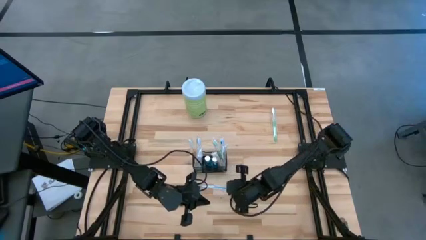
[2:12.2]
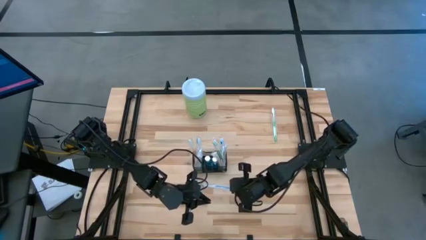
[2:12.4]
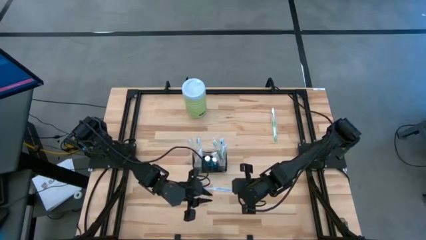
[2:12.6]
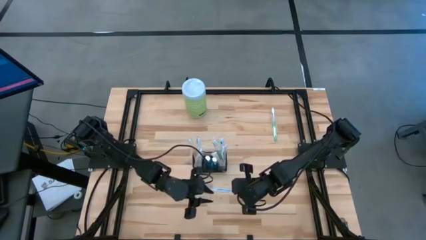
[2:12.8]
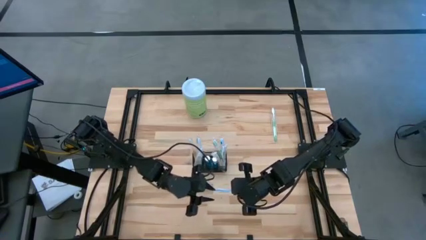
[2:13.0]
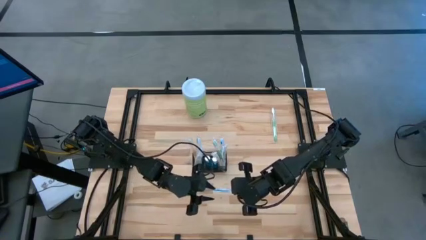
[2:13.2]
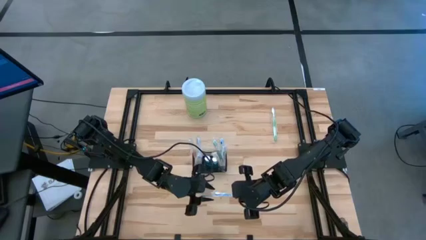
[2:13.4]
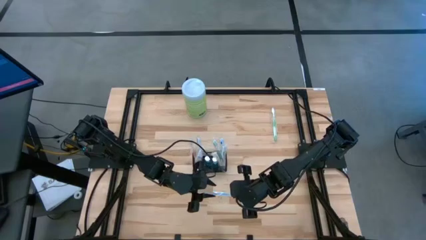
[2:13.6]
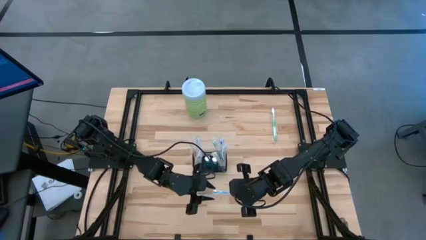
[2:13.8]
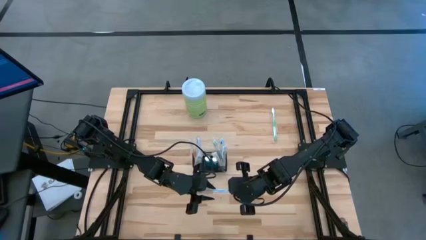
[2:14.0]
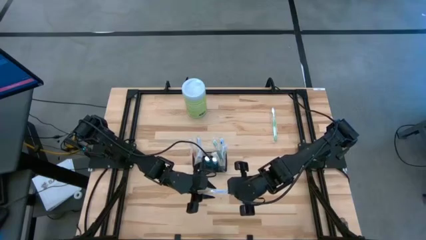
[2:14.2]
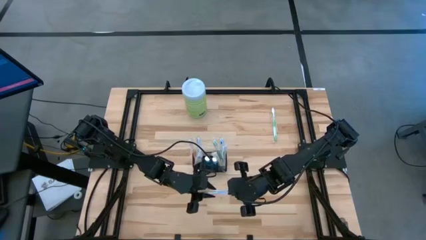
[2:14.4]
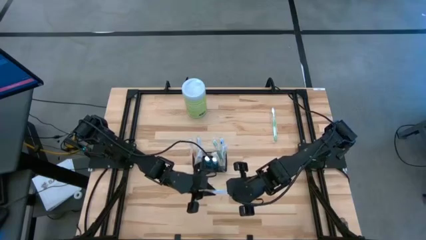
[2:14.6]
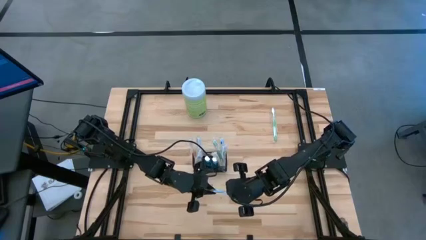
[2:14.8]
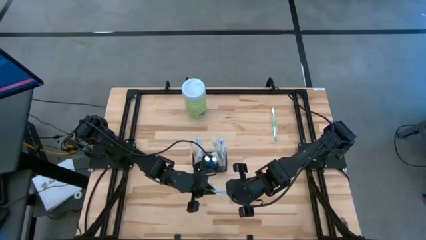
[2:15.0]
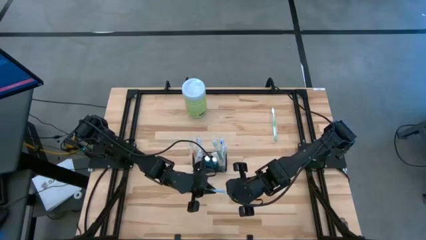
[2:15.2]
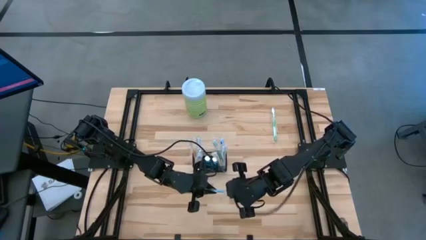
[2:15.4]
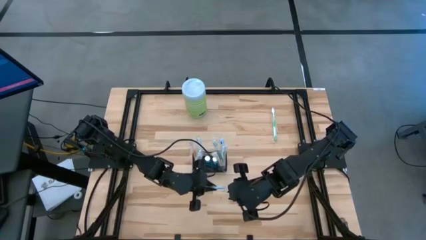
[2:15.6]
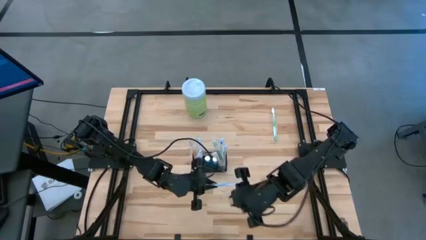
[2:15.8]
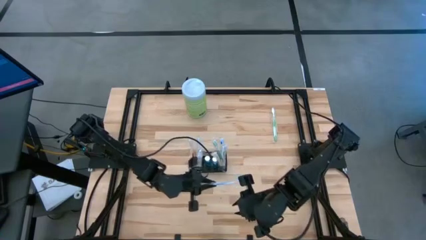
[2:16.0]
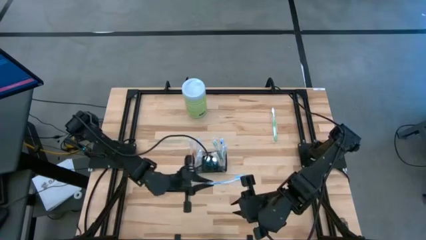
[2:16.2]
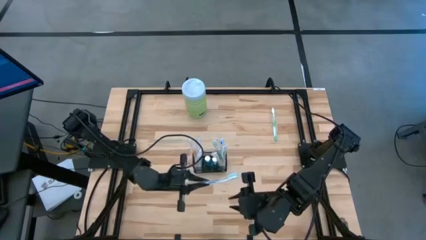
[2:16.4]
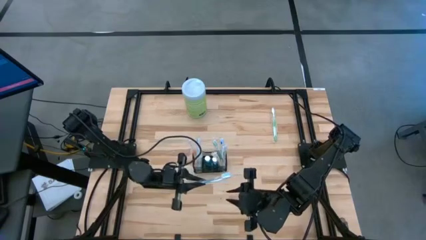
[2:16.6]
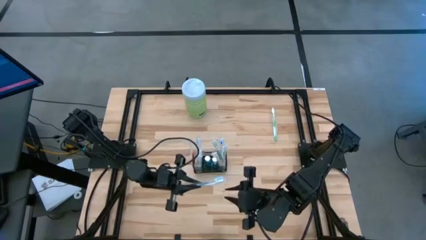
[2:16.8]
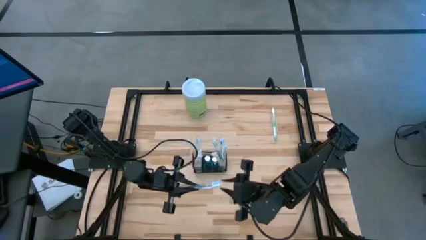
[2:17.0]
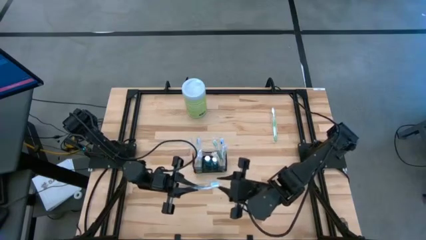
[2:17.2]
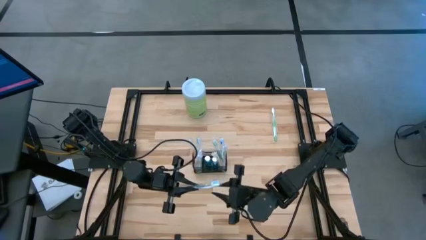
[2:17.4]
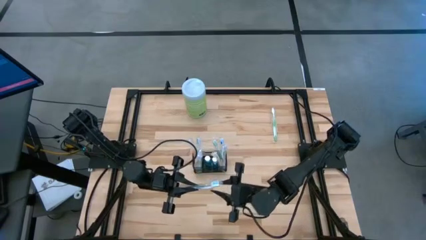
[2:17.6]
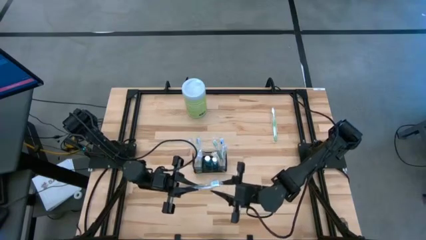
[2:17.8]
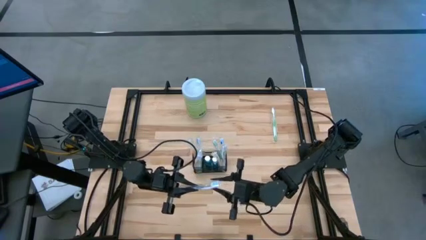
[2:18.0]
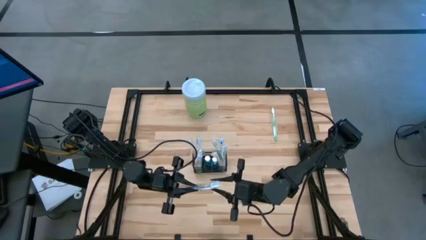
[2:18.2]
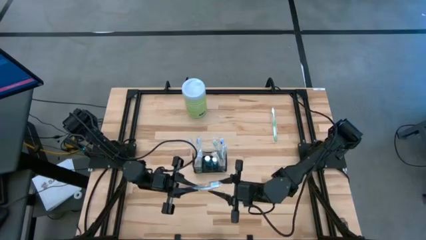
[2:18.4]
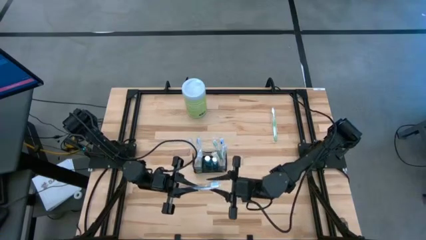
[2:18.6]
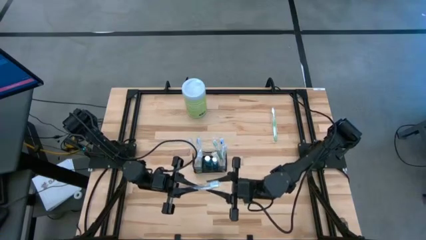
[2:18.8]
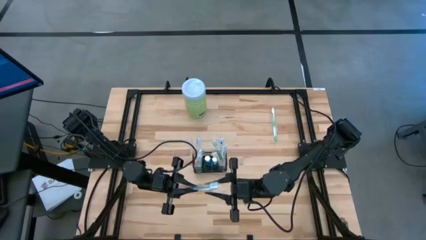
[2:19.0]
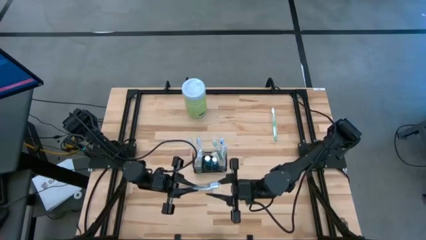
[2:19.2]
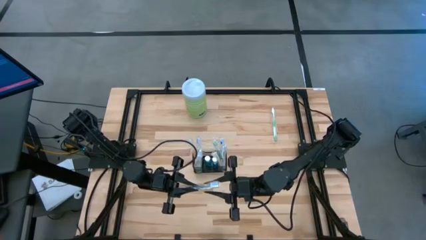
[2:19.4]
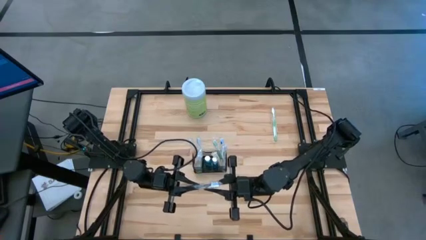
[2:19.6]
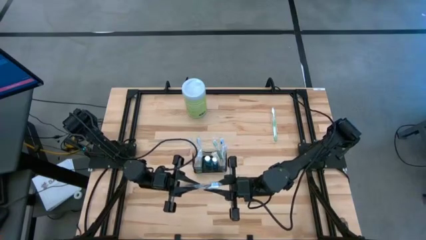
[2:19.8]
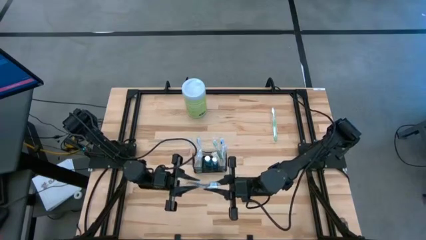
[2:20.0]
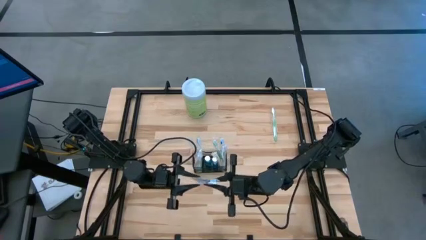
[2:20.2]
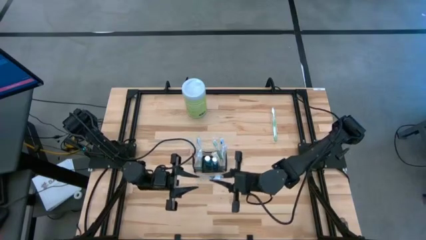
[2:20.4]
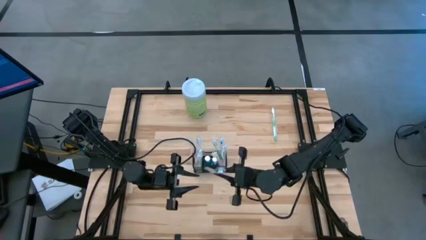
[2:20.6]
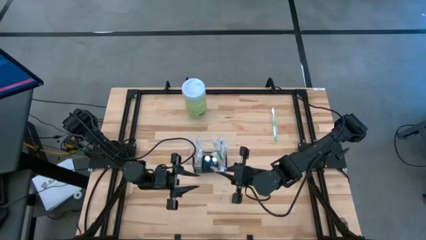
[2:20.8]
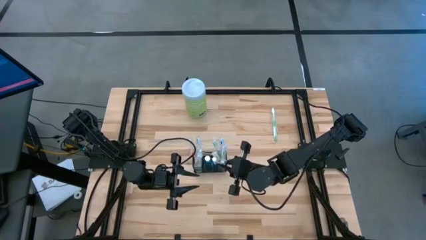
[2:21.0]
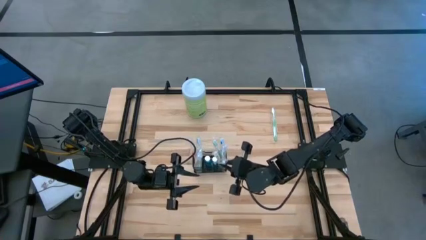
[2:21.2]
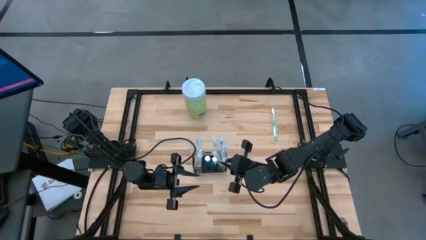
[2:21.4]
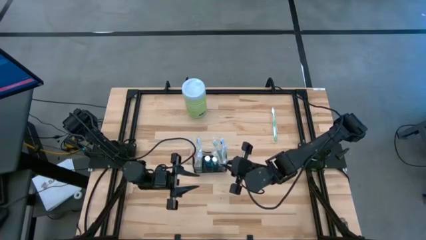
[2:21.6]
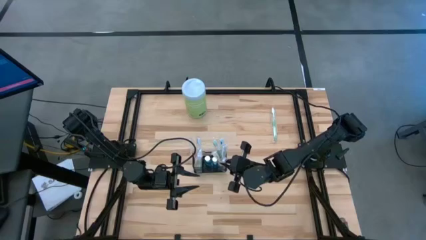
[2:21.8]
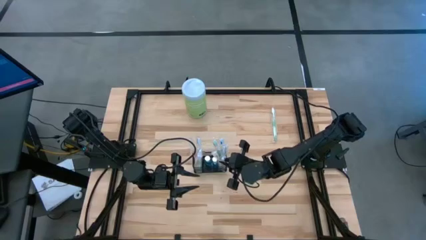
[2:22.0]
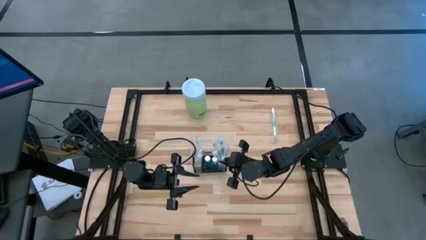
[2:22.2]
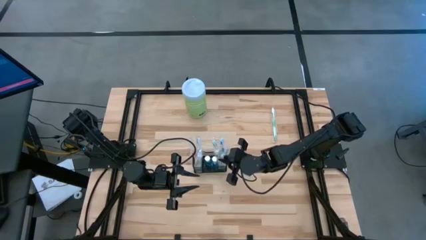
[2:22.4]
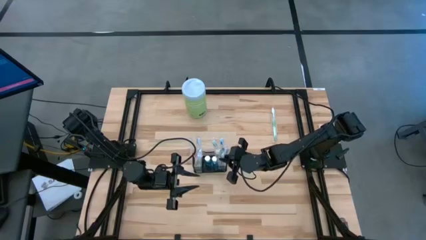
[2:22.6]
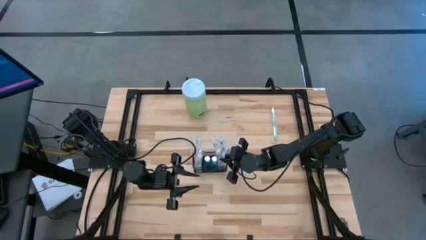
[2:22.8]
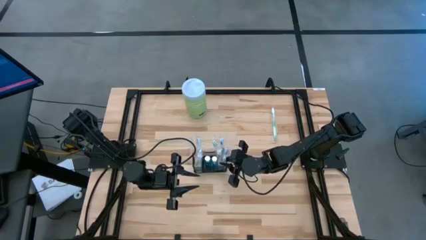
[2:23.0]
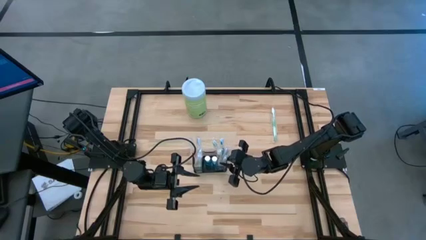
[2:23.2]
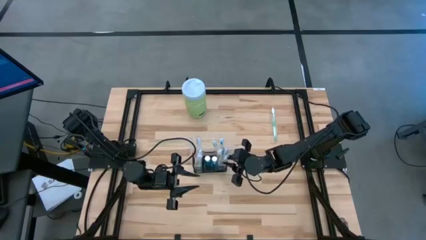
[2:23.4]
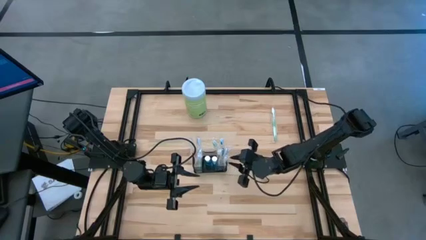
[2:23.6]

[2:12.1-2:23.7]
Task: Pick & Place toothbrushing station
Put the blue toothbrush into the wire organizer
